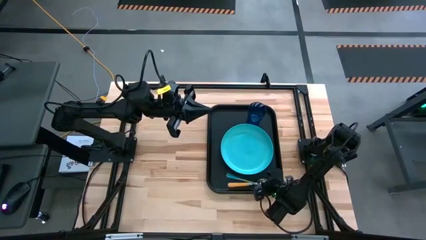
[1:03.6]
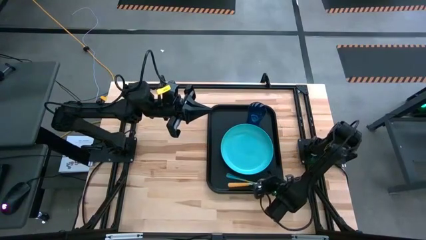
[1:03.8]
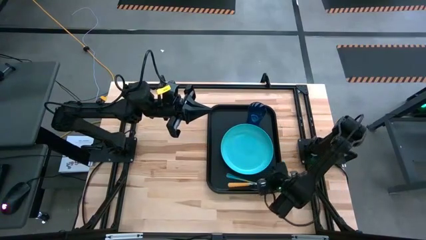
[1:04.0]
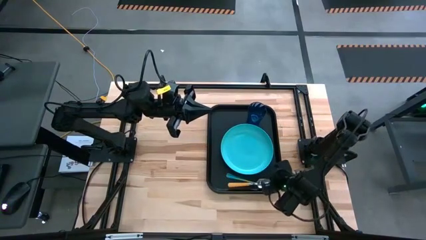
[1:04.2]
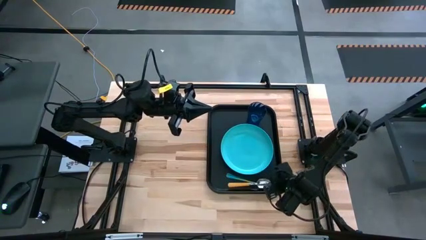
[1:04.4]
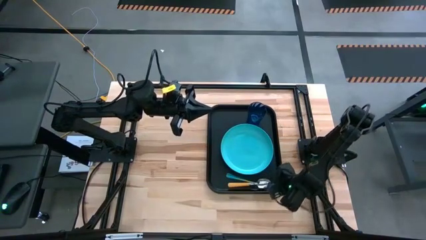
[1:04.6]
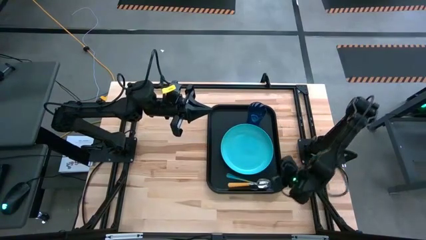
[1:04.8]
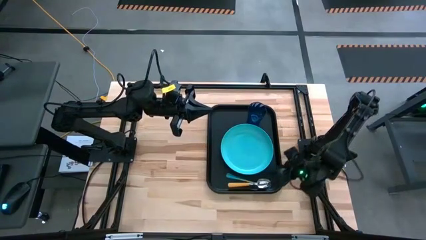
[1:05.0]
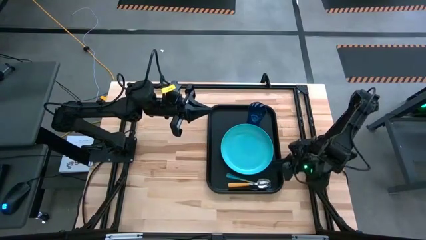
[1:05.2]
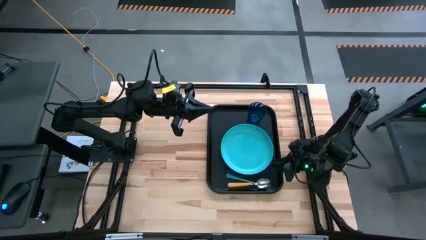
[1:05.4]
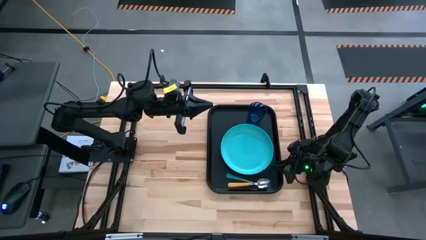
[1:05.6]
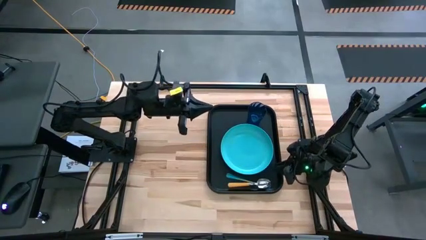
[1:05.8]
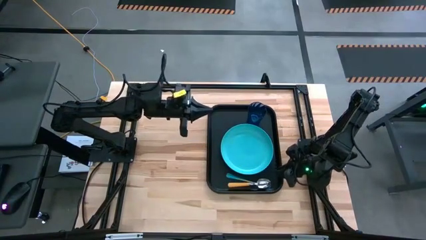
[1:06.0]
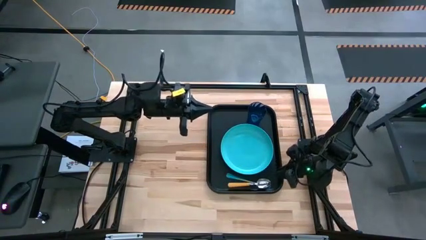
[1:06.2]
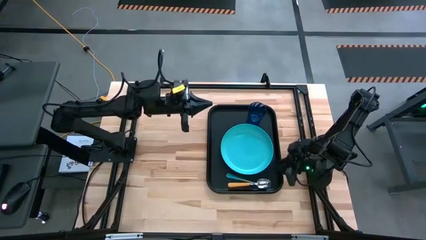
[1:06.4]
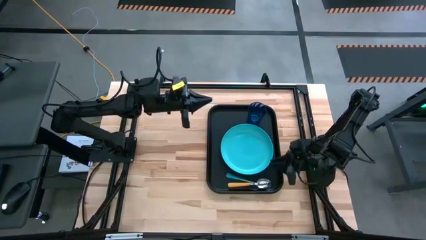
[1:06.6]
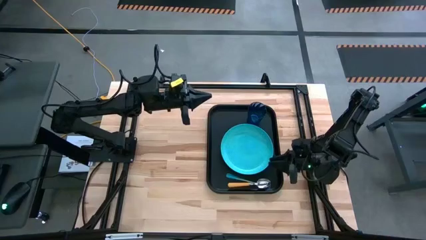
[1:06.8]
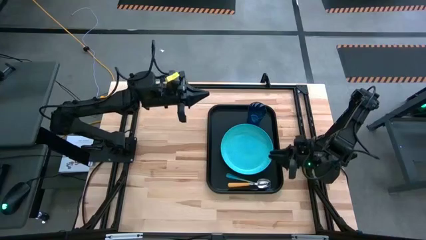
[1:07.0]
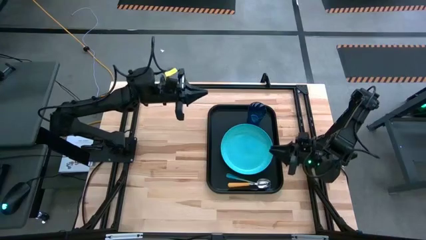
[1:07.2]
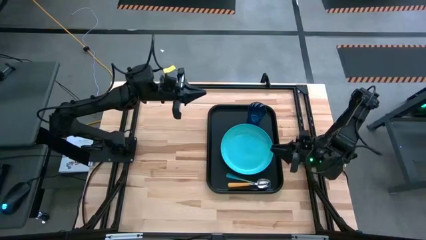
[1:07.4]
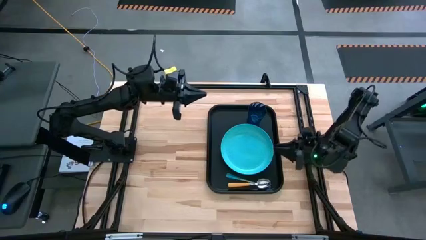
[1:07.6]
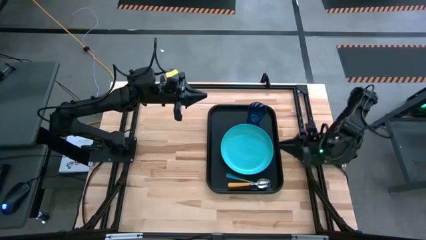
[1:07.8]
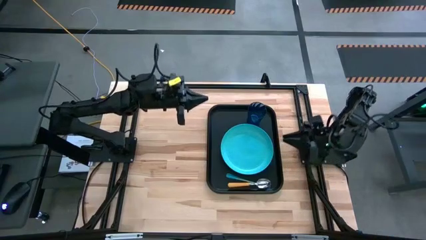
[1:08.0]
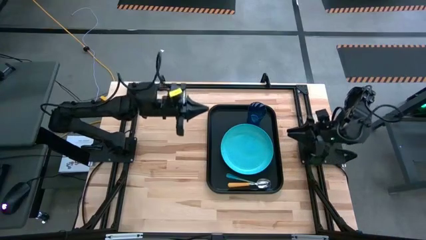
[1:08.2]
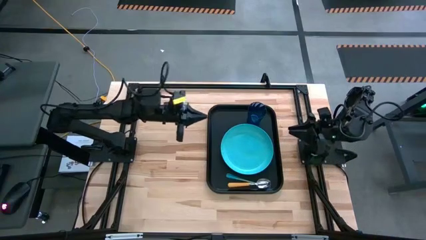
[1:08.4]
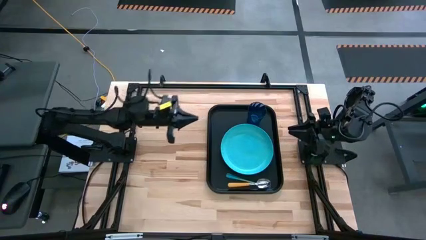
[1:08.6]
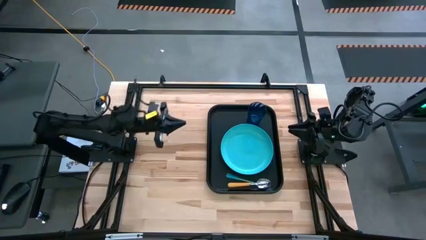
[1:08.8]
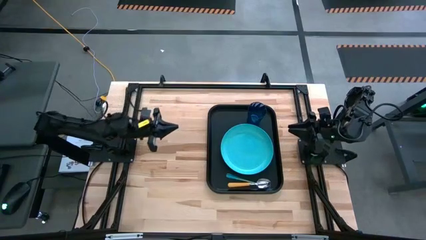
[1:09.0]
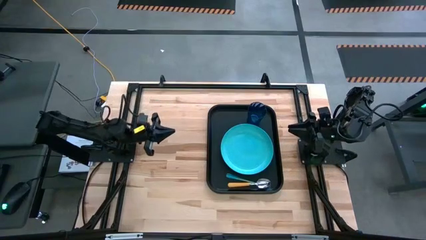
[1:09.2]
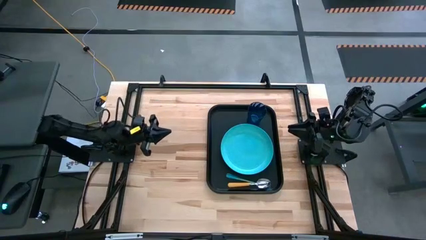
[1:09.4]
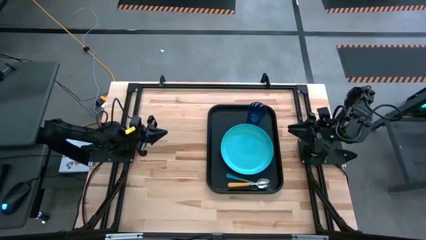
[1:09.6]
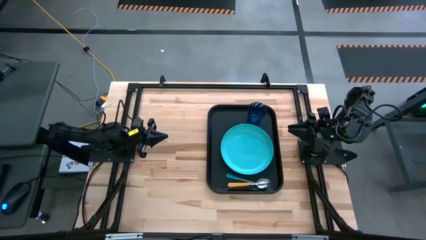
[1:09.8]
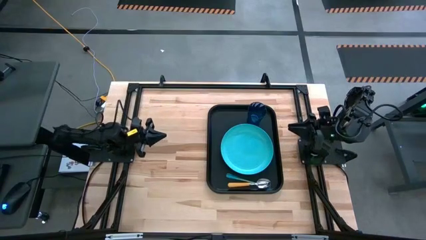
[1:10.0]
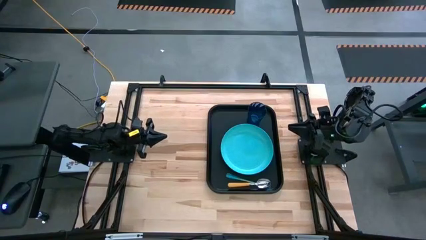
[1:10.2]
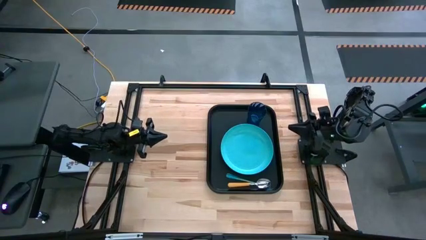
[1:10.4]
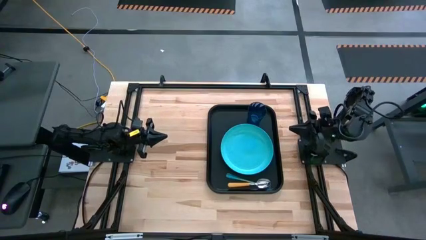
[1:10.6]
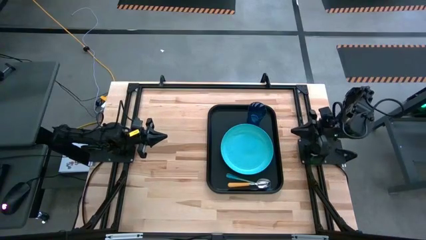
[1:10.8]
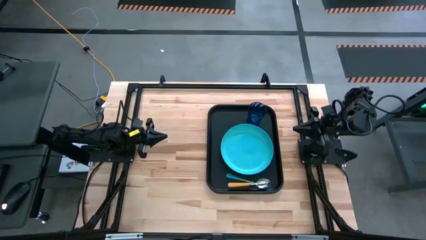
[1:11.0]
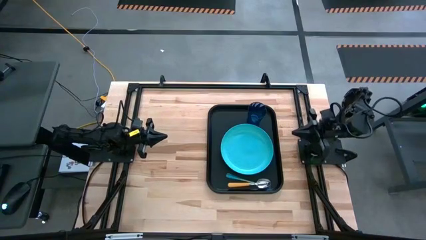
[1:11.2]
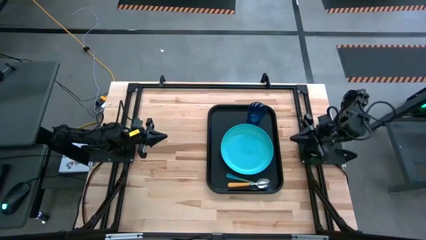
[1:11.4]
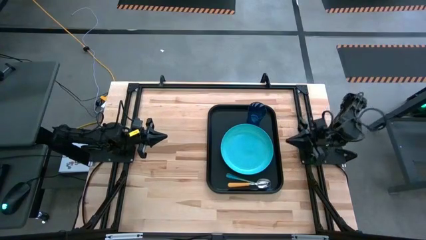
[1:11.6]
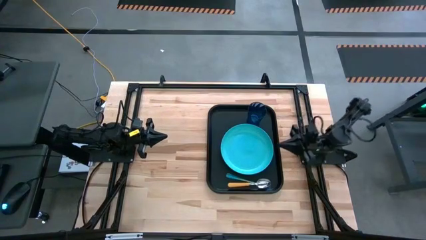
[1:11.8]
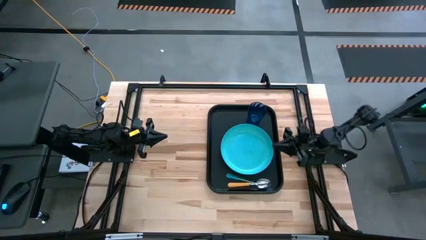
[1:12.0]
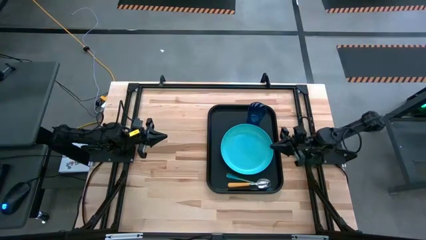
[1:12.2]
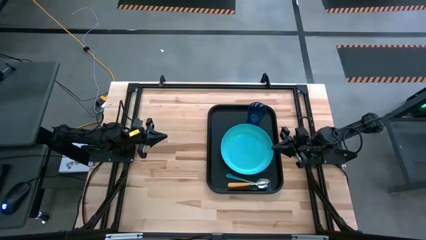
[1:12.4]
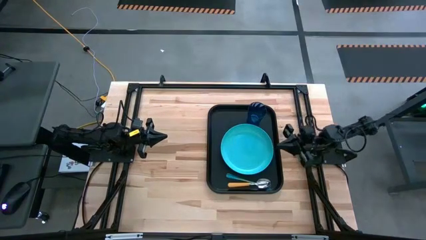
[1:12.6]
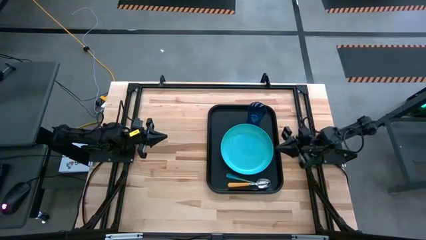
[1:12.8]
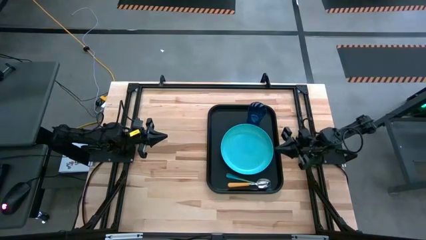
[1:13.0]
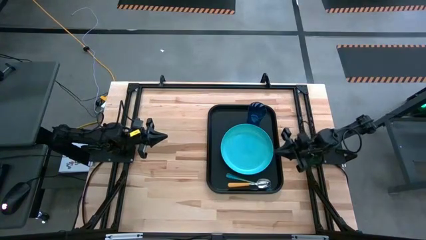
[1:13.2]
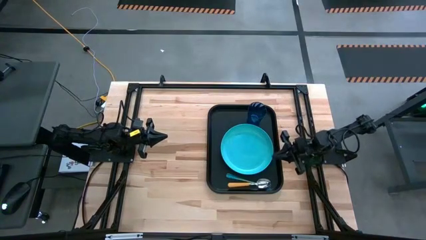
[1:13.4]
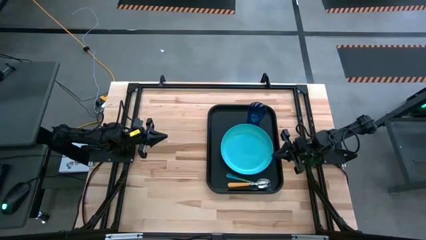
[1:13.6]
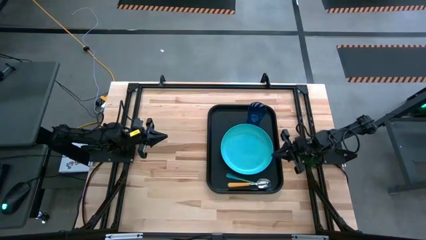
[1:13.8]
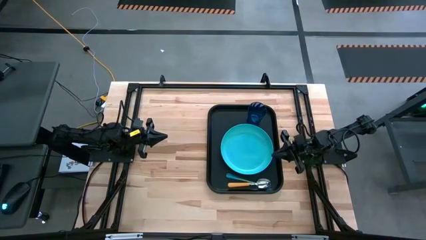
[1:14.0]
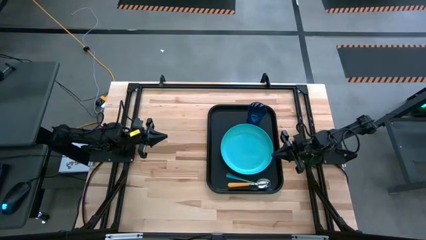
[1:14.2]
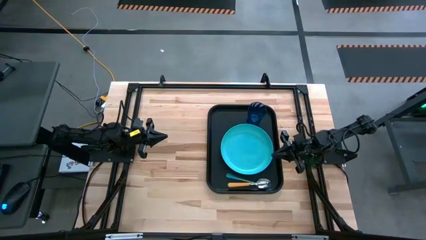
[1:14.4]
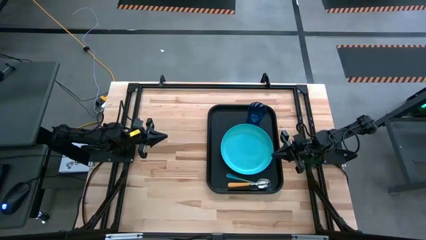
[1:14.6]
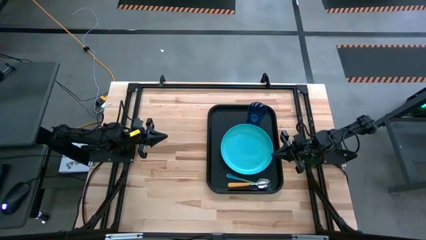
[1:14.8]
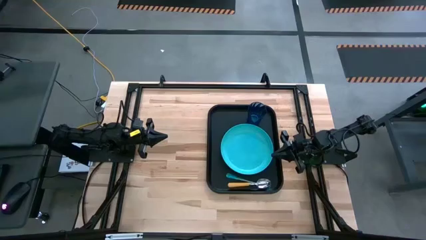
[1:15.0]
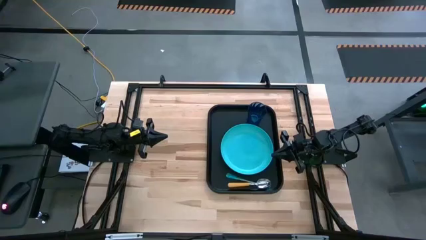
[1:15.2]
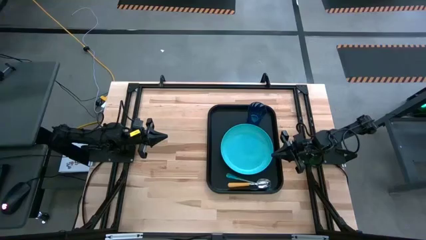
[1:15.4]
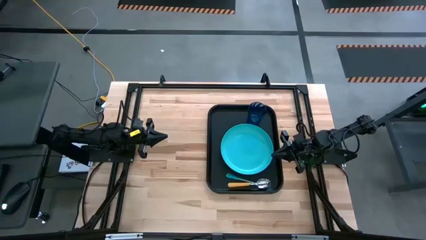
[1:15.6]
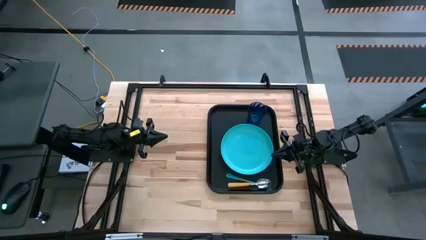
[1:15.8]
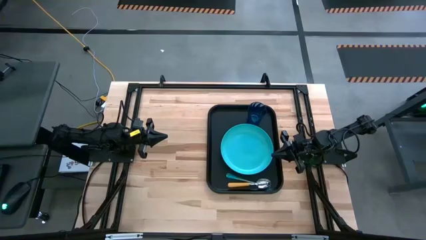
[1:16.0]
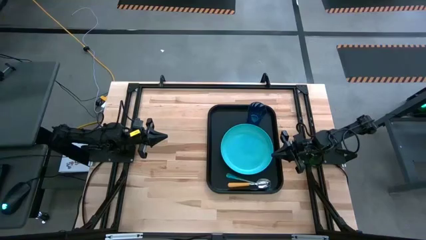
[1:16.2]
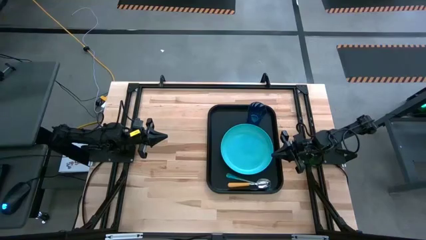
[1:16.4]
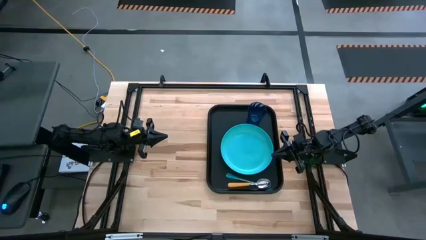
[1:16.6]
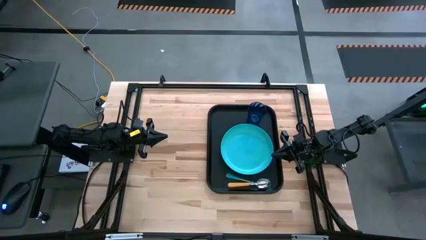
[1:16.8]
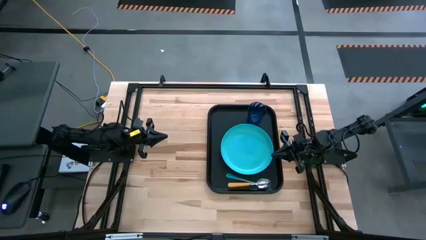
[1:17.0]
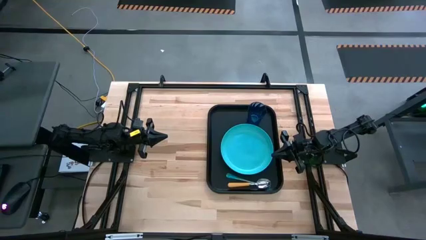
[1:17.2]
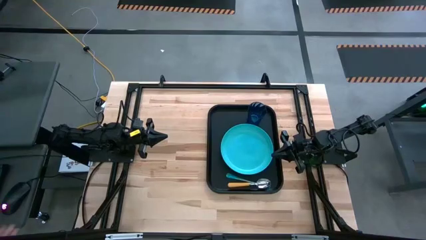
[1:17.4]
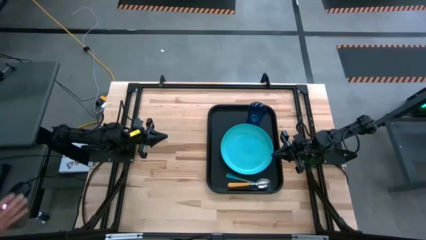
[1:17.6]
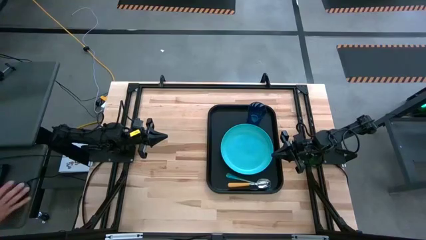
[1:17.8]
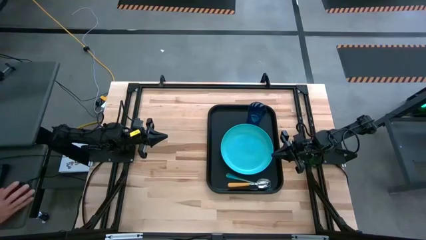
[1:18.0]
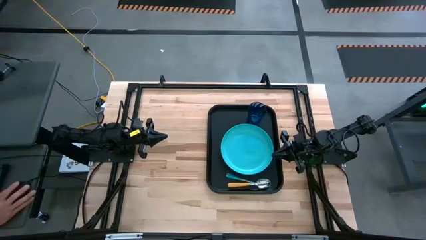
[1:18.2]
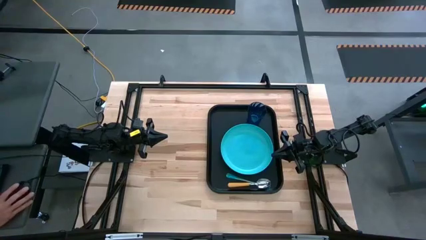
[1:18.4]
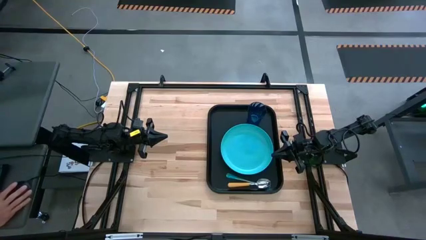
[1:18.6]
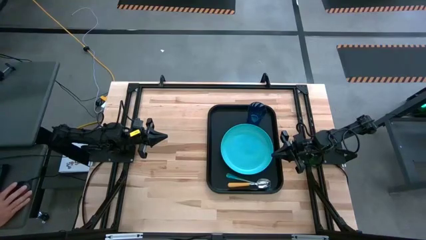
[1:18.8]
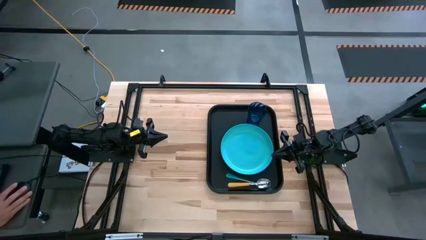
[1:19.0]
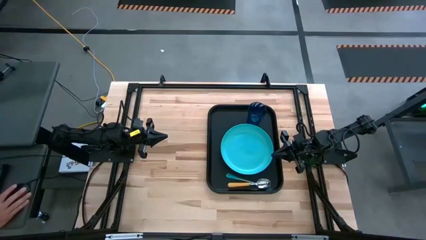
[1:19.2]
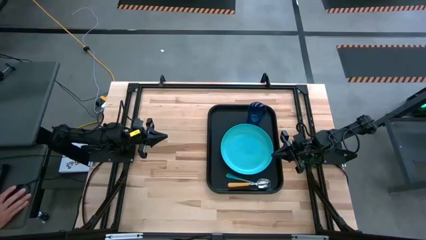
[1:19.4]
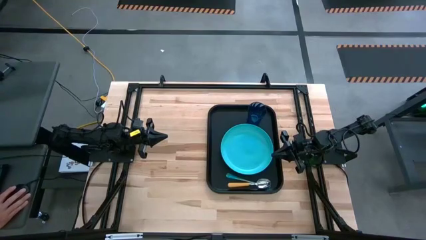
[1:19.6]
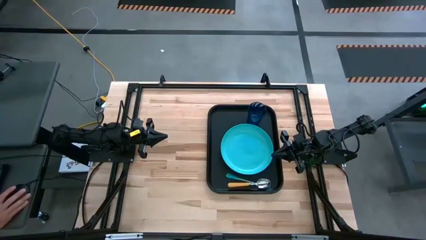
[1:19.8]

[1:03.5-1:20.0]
Task: Pick and place plate/cup/fork/spoon on tray
Return to Home Position
